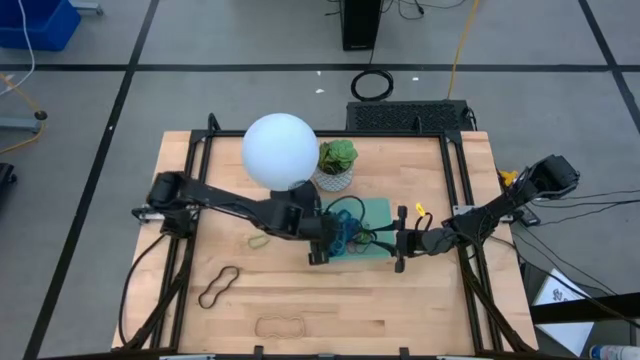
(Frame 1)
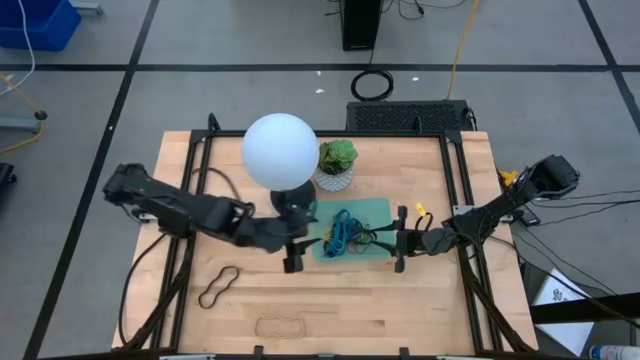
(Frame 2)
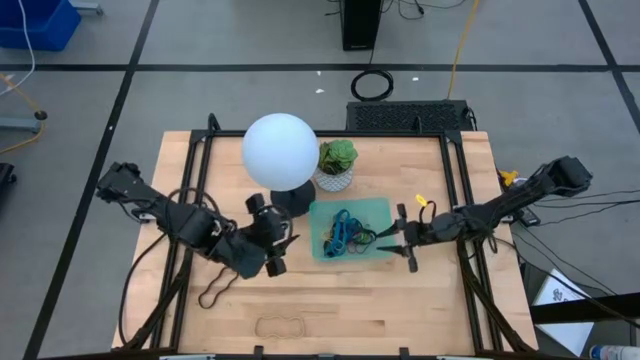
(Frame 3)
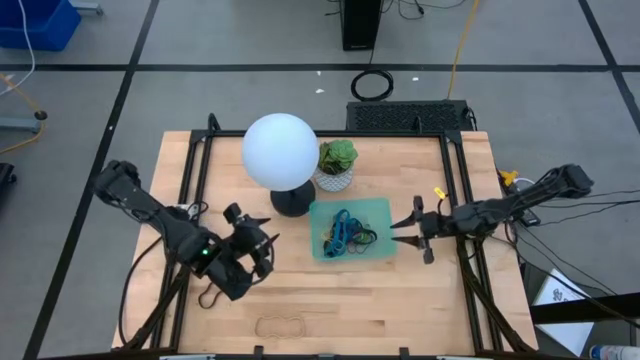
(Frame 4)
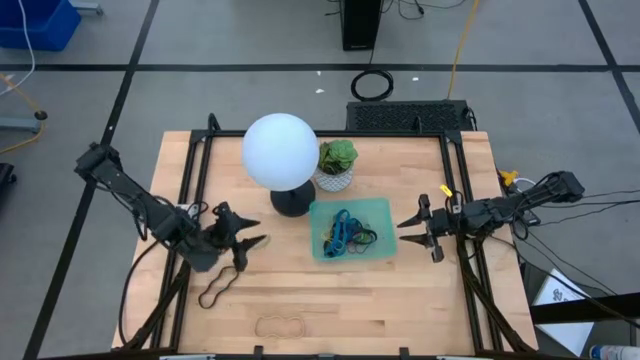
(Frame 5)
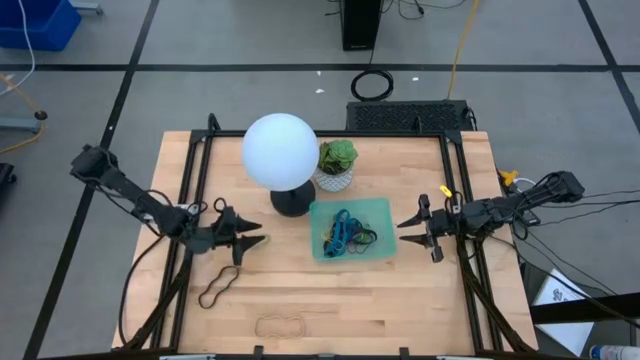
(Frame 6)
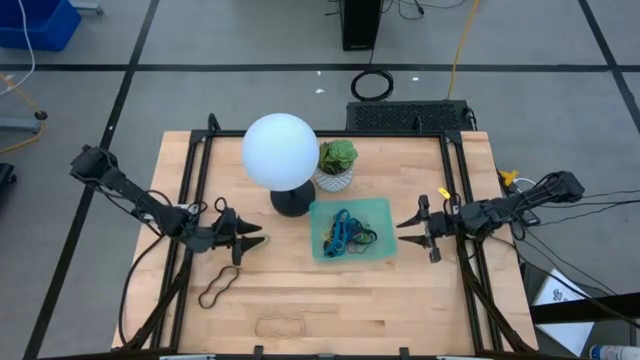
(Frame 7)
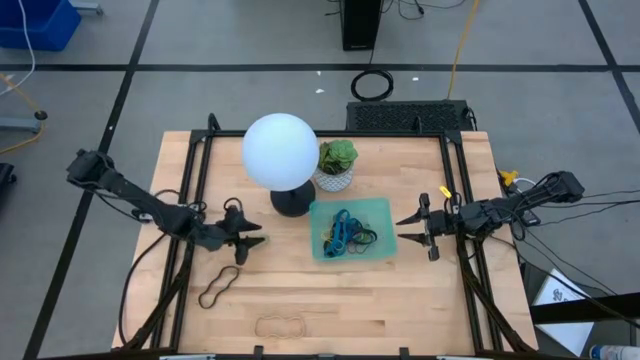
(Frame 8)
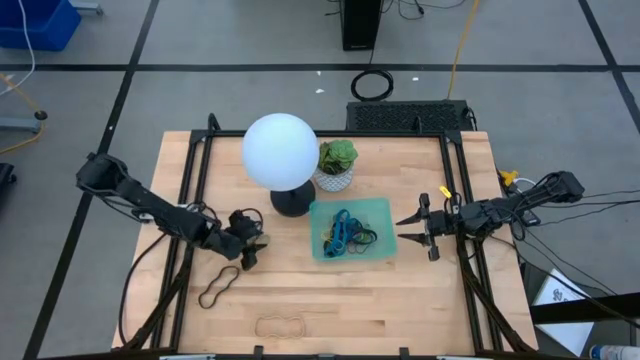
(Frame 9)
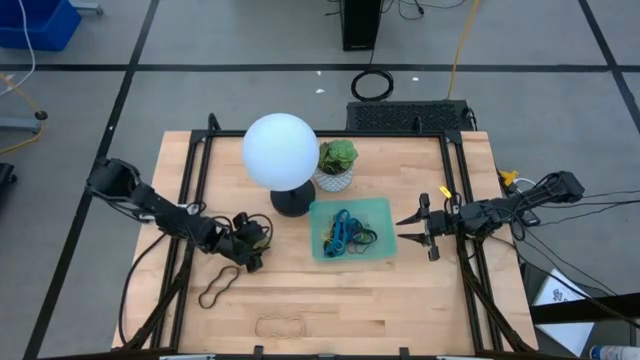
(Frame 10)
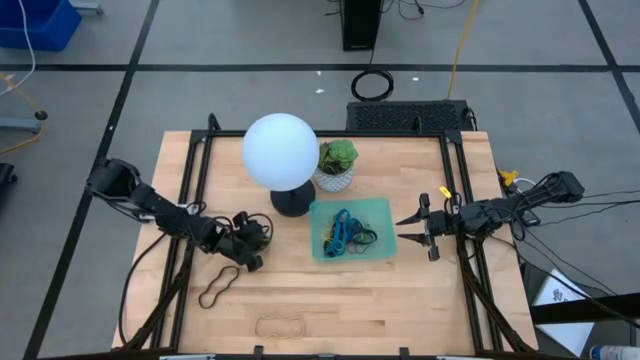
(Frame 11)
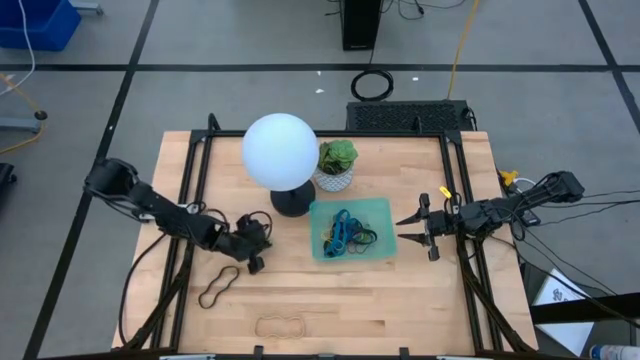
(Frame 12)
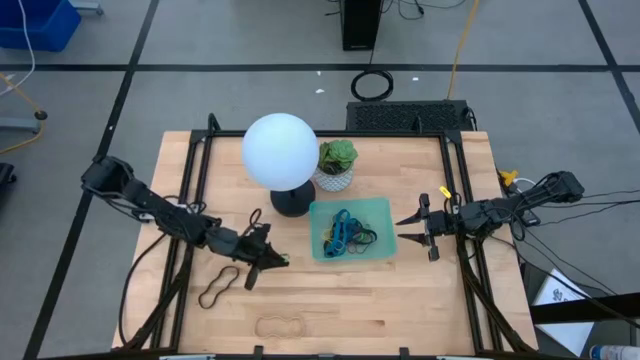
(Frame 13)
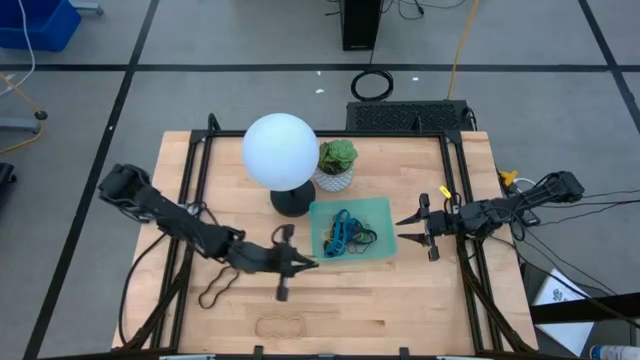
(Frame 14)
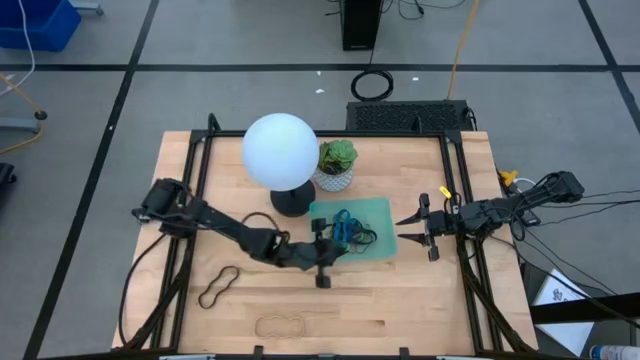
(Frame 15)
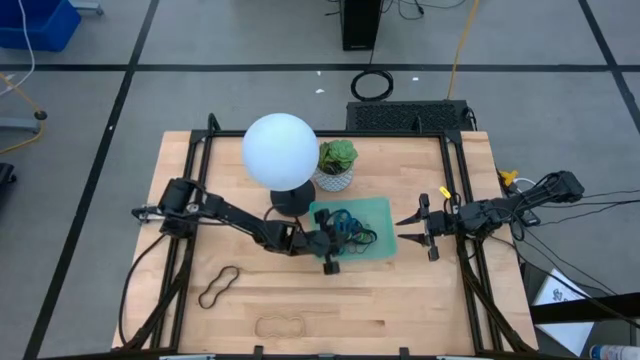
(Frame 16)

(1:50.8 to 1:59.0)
Task: Pick and place rubber bands into bin
Put the green rubber band into the blue bin

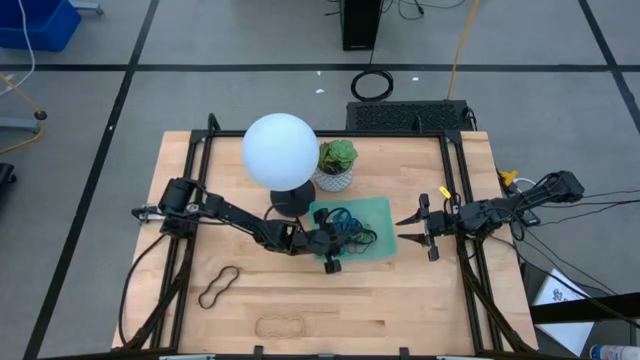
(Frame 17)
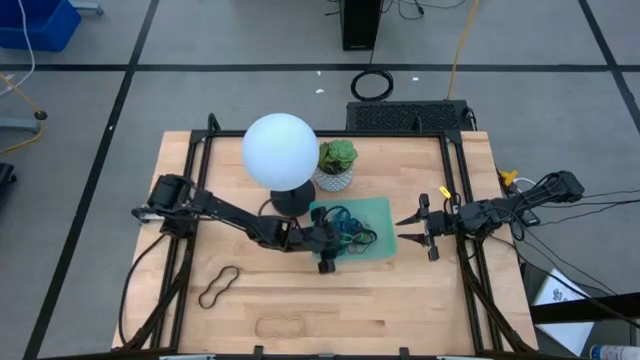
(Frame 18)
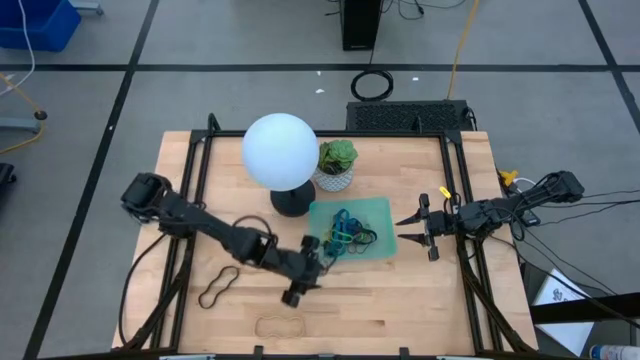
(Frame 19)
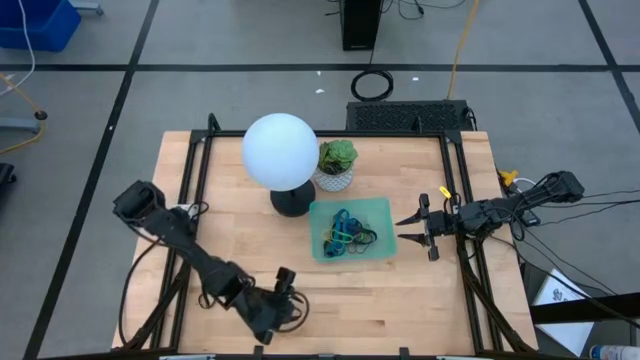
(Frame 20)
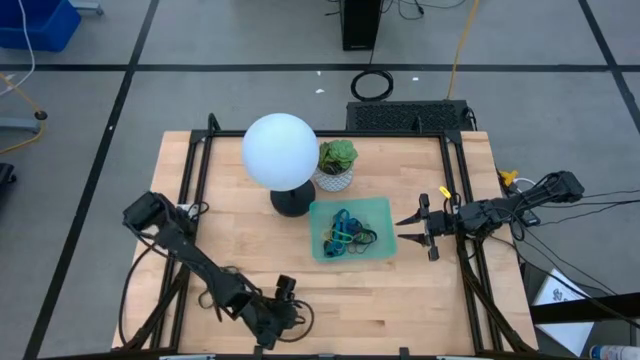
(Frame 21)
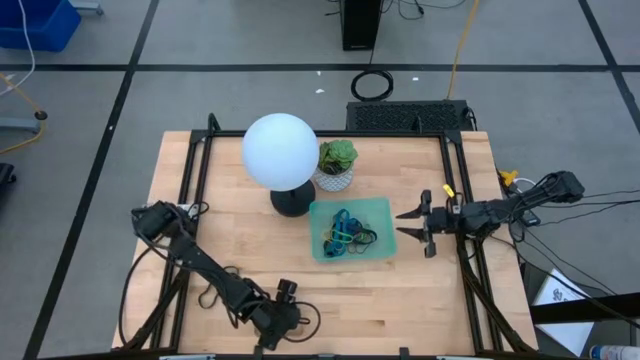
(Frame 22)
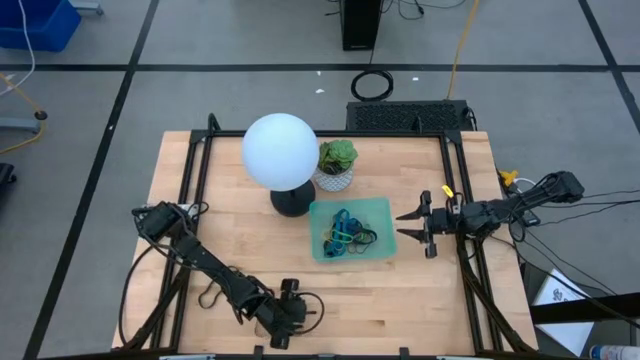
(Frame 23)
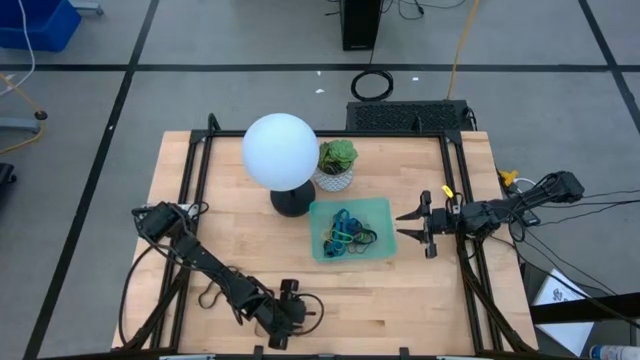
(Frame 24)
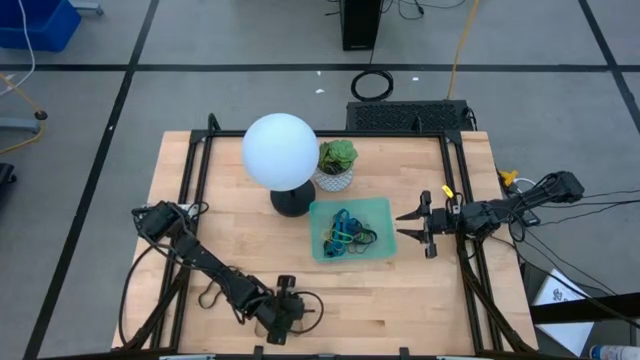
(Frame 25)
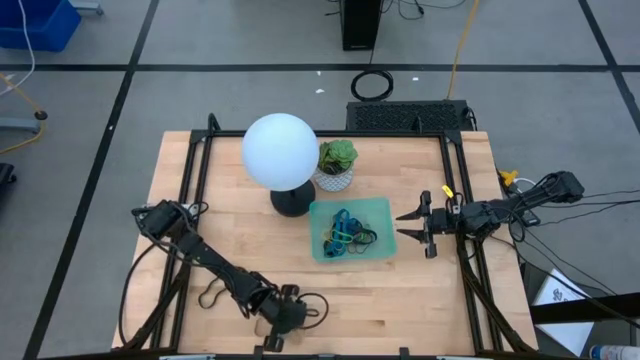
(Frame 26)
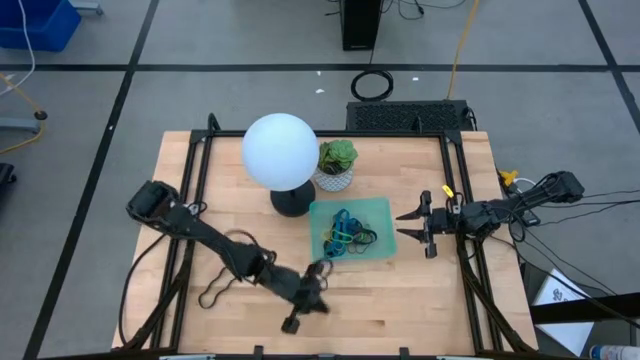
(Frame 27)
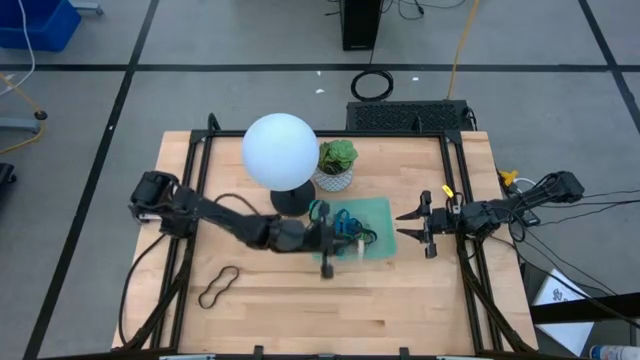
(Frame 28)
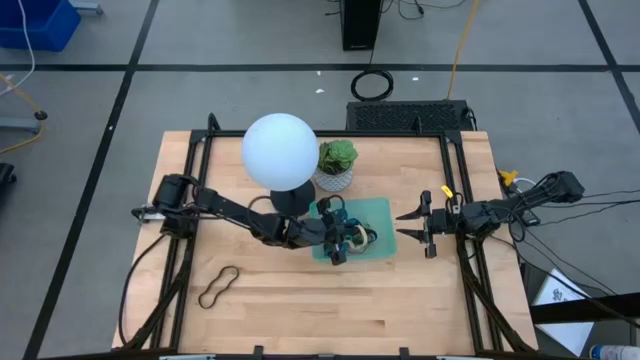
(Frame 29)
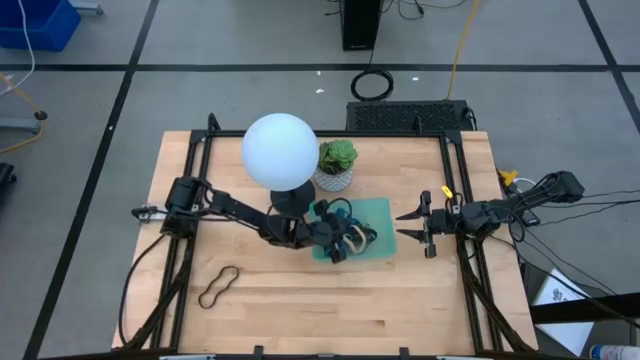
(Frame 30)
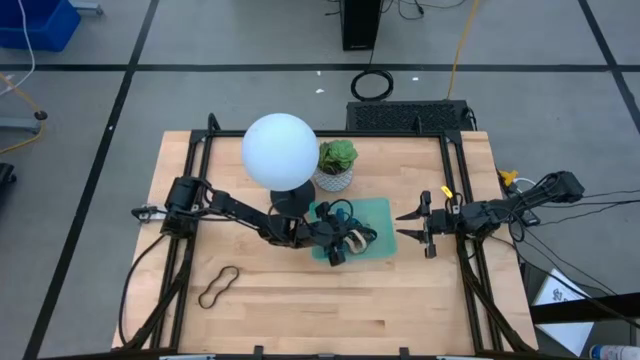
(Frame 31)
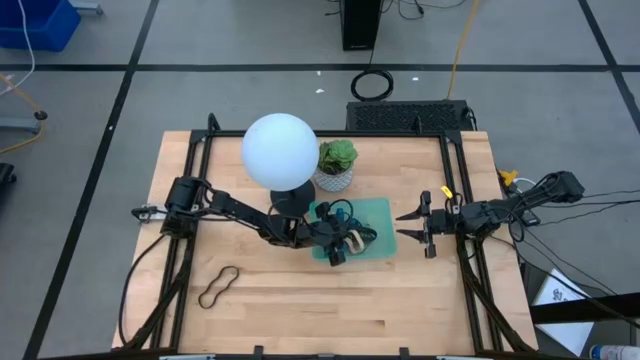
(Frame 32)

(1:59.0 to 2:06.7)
Put the brown rubber band into the blue bin

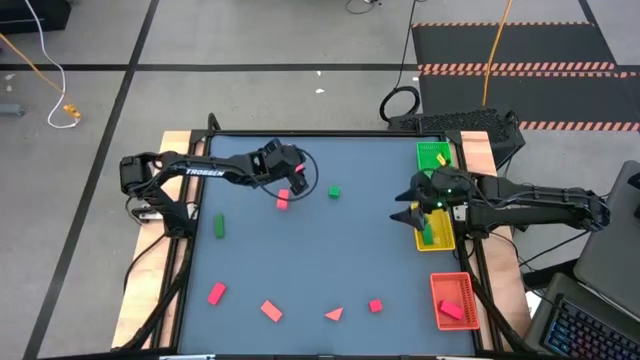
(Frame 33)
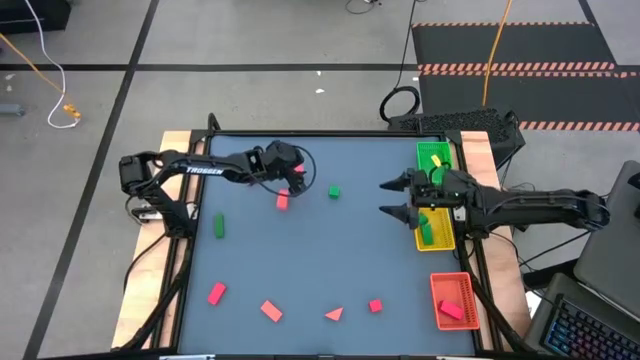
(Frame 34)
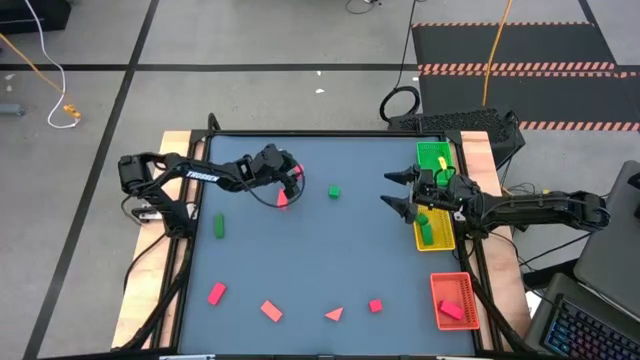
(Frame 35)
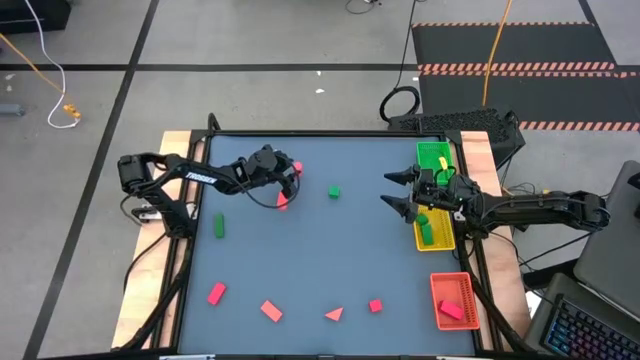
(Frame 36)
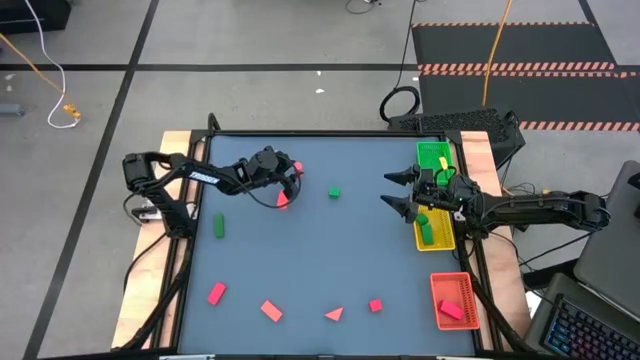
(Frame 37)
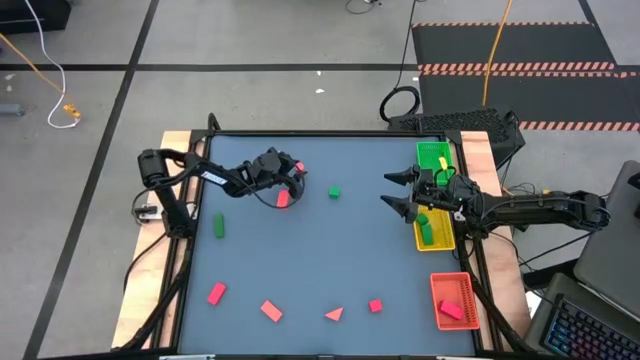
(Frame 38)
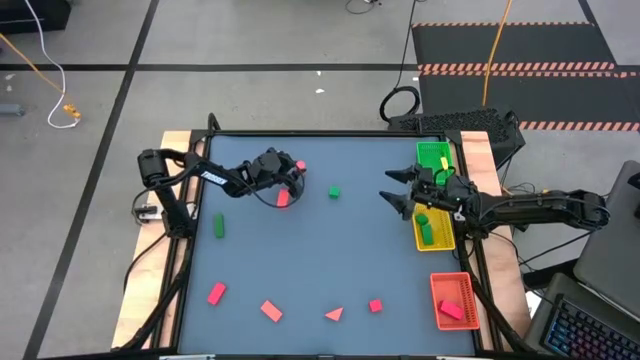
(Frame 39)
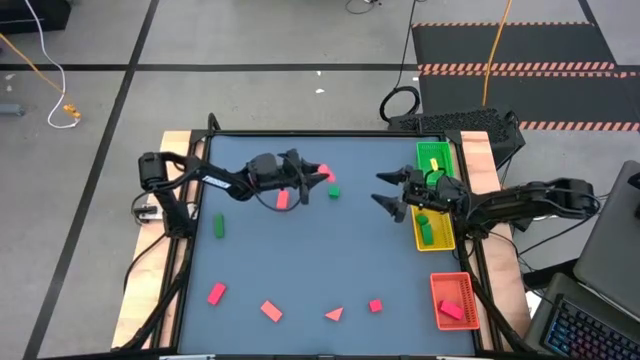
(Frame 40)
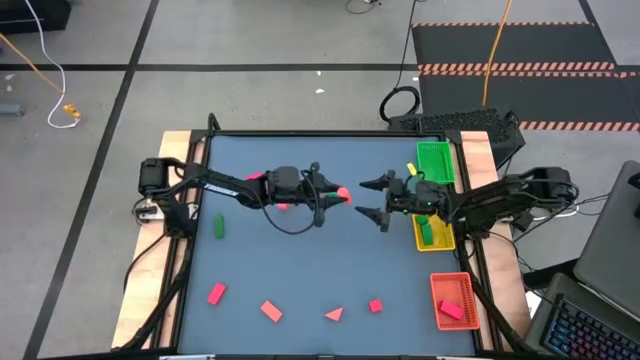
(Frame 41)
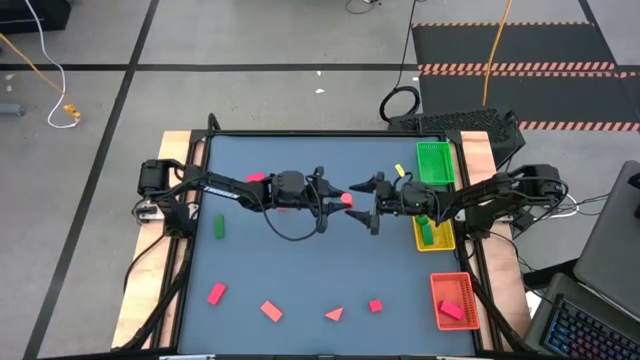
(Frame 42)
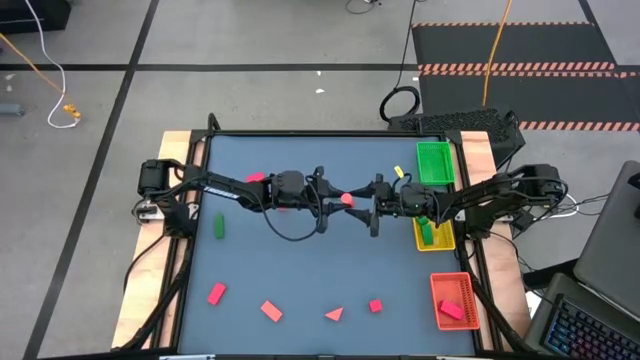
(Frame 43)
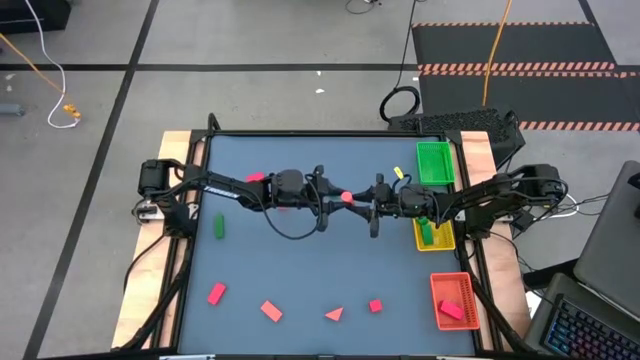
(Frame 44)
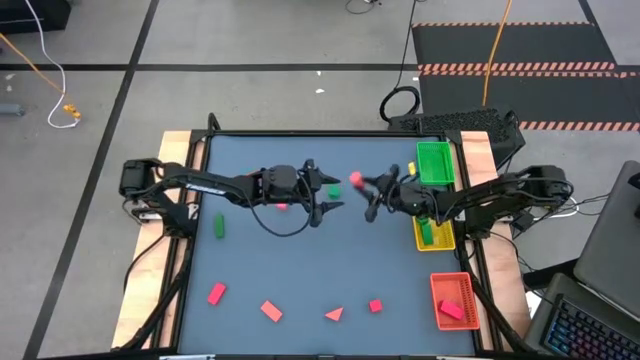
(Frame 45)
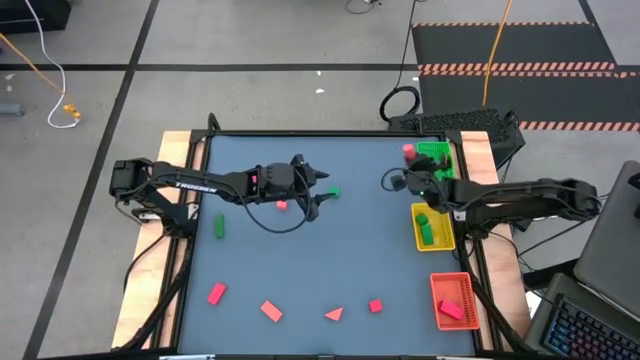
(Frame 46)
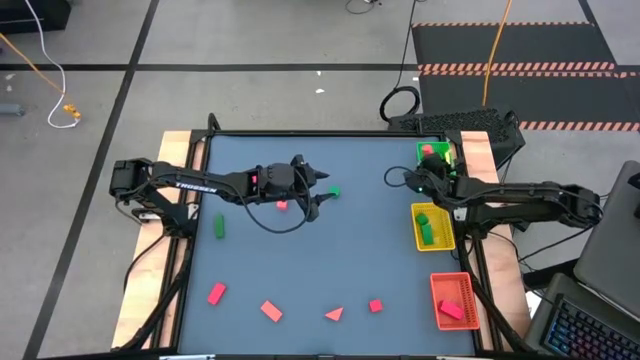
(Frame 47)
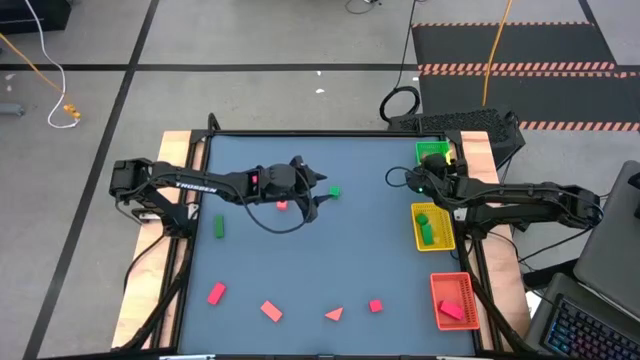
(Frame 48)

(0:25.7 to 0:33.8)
Task: Sort & place blocks by color
Put top right orange block into the green basket
